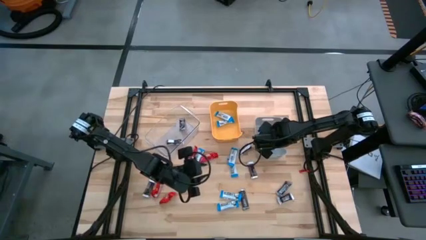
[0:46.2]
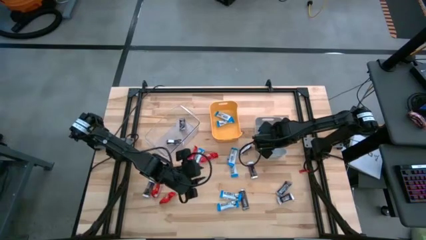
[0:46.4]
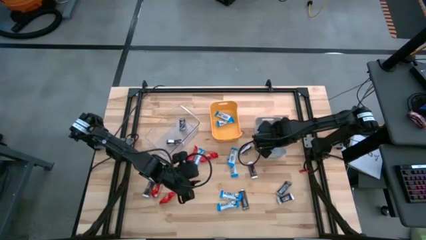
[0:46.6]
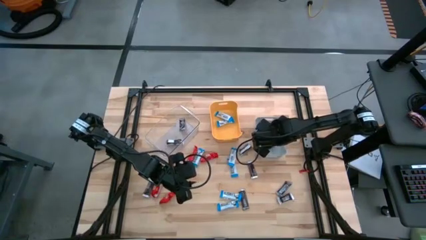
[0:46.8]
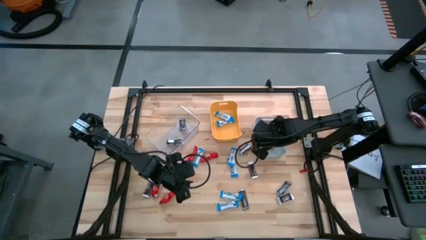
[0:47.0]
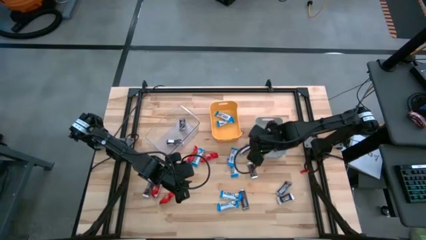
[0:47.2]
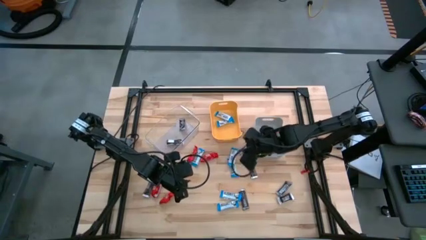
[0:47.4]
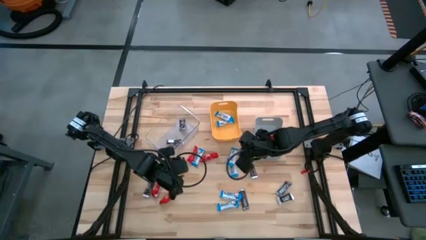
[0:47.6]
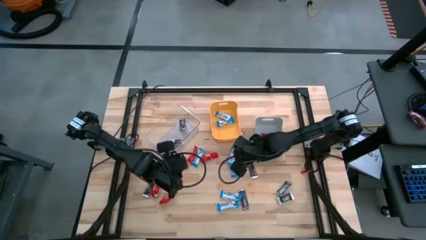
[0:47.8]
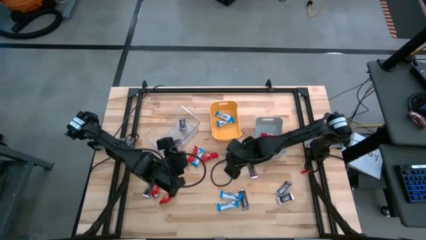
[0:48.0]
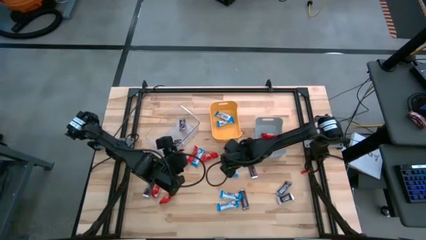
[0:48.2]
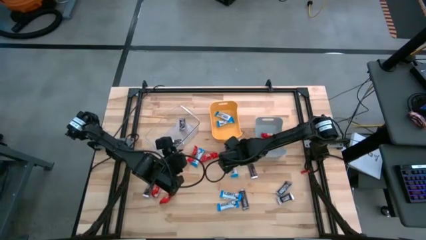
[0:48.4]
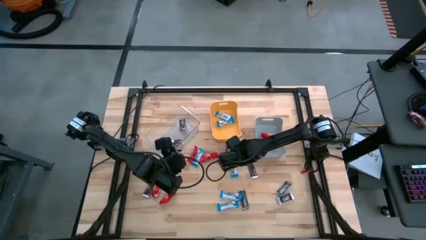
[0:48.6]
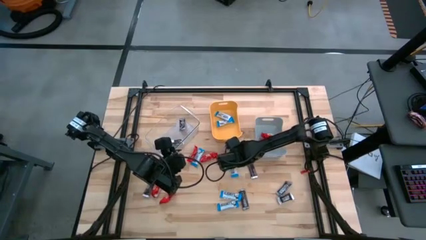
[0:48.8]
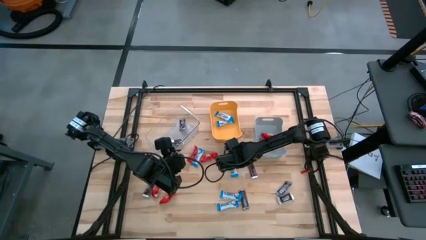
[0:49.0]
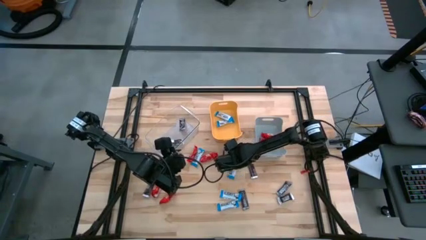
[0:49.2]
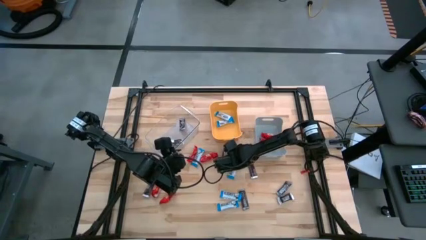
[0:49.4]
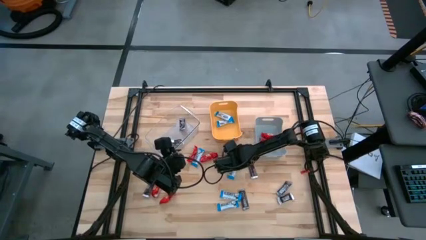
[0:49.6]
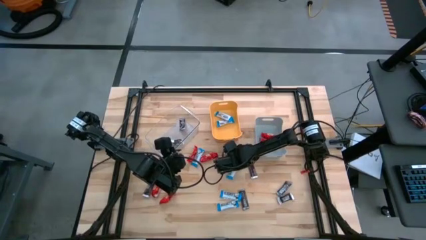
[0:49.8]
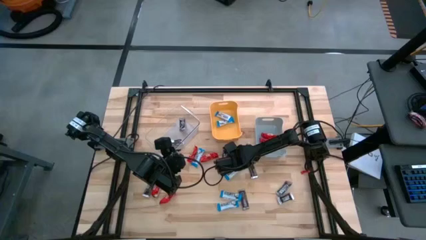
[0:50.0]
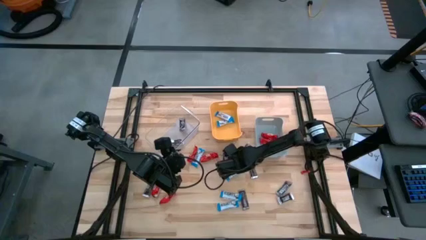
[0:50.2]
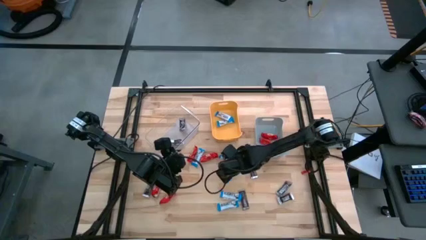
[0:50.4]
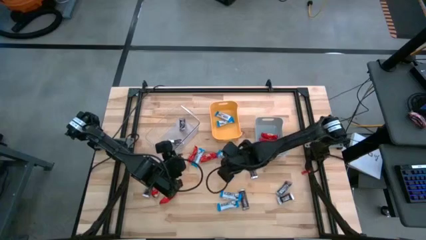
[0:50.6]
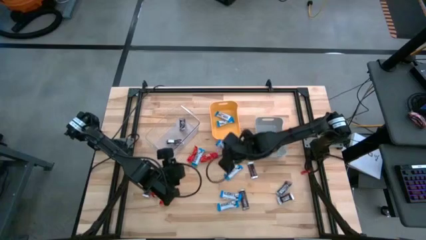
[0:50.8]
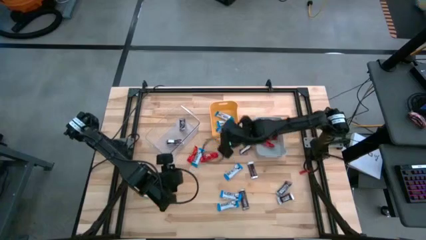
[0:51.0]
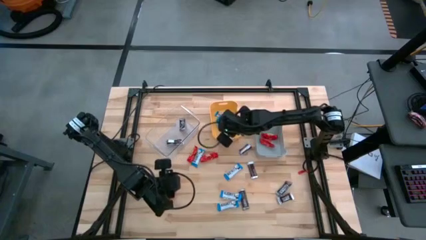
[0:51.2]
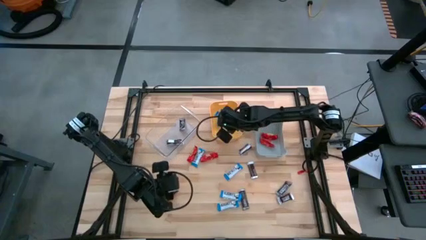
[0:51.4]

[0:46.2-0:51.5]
Task: Organize candy in baskets
Put the white chocolate into the yellow bin

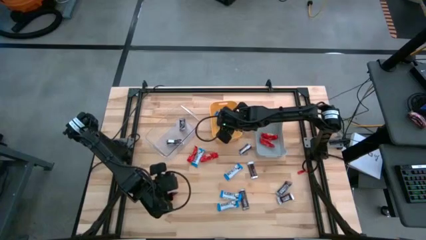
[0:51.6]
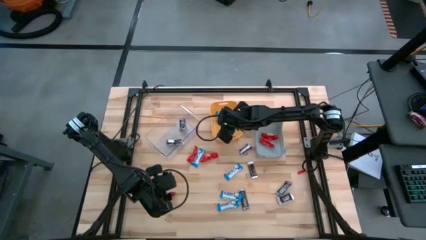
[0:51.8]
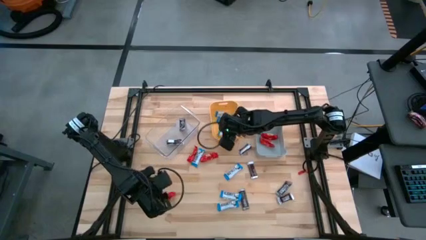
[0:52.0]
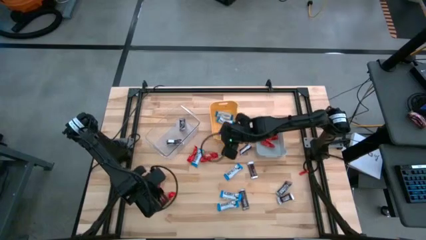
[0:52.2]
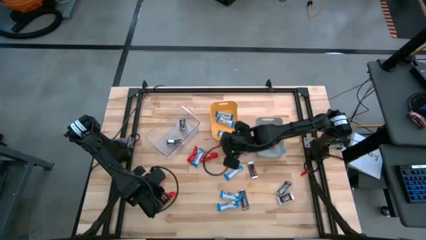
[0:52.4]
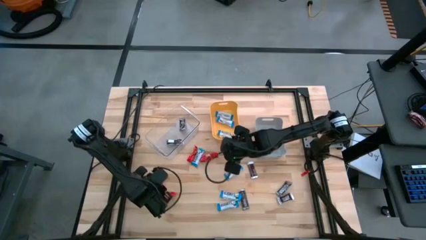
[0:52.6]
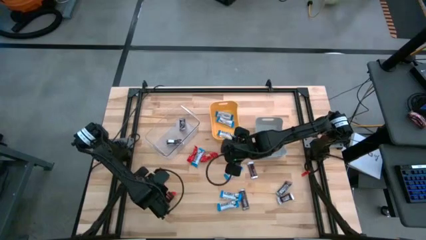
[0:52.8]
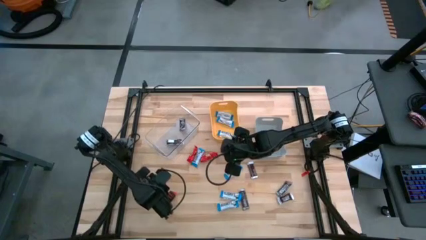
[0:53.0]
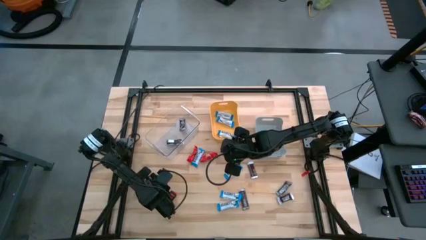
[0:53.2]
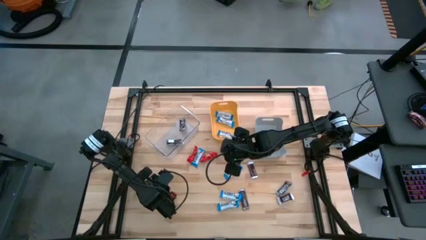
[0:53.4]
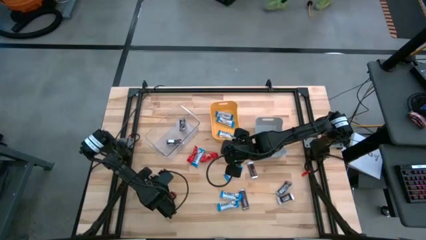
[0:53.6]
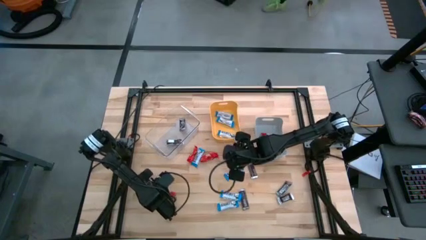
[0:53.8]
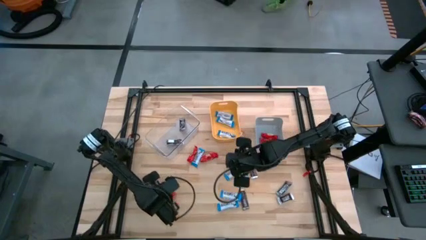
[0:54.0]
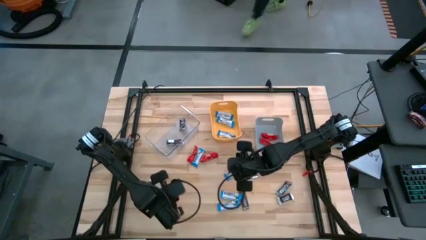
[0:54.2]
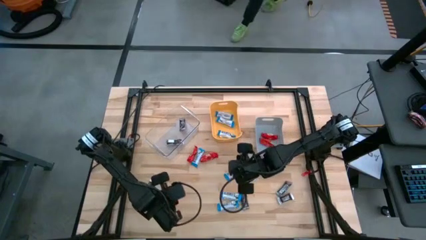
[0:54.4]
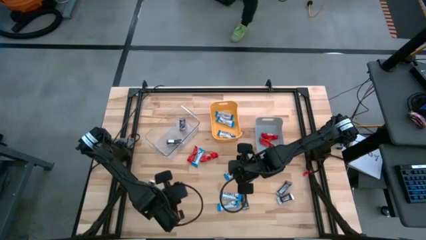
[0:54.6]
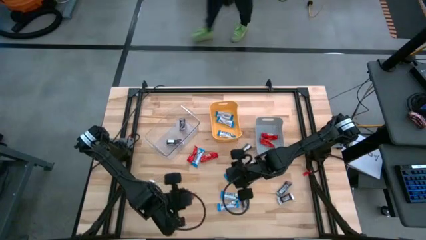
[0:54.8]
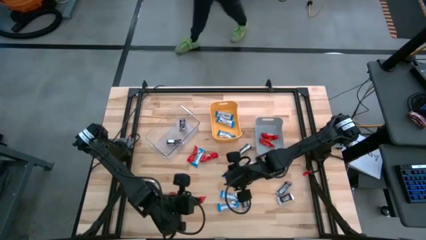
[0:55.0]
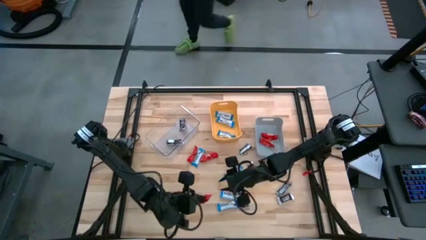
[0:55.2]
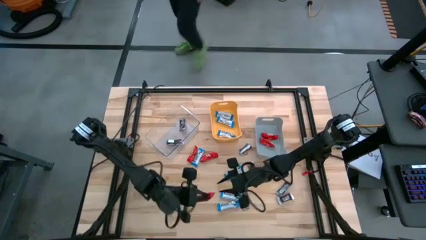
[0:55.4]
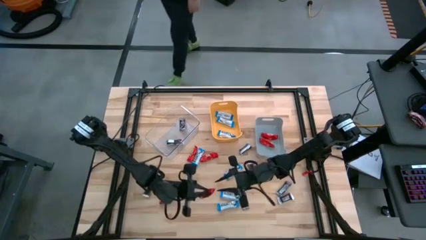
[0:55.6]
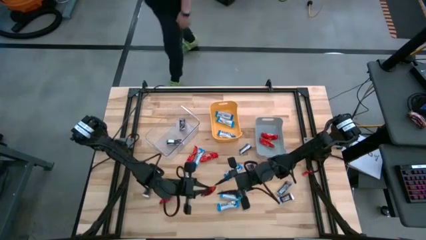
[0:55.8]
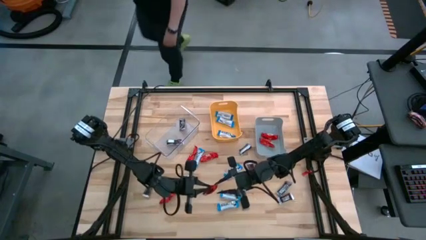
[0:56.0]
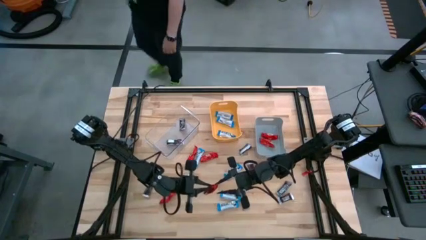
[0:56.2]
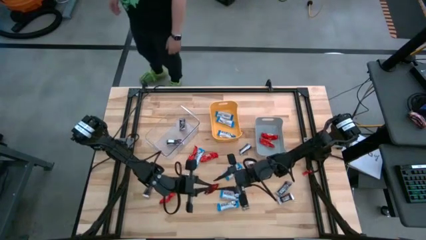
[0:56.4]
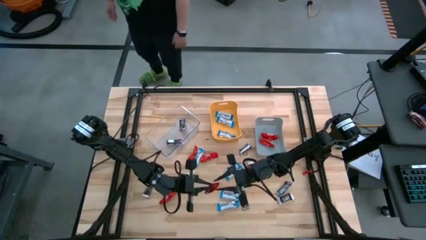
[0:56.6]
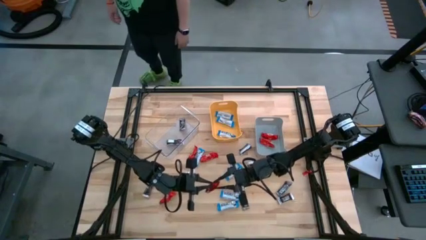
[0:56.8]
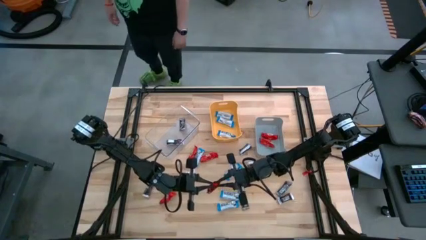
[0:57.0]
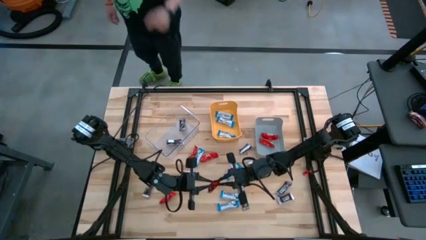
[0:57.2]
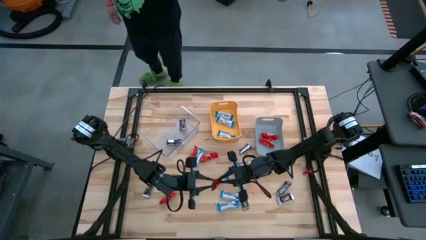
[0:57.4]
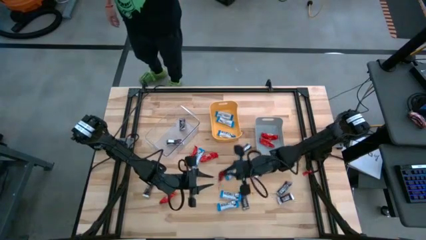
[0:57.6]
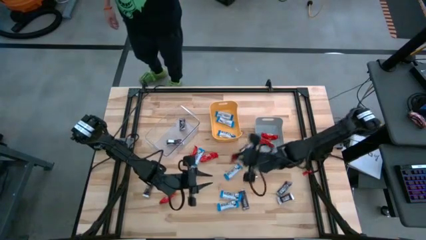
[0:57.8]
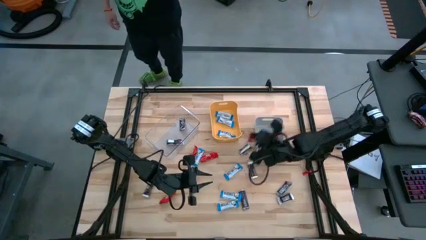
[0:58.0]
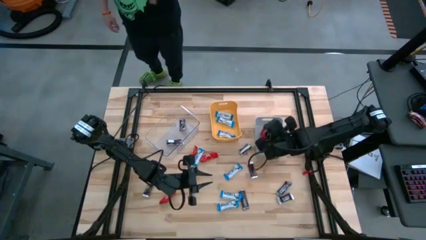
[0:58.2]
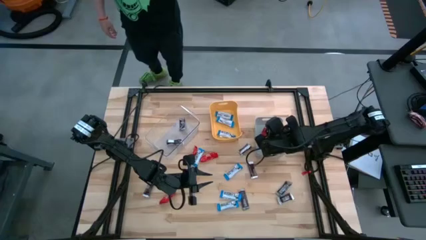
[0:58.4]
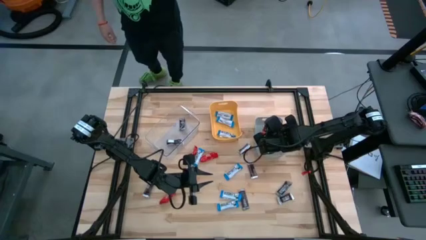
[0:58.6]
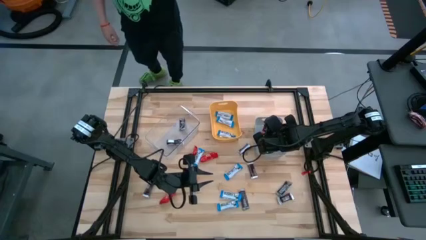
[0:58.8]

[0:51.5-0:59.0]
Put the red chocolate into the gray bin

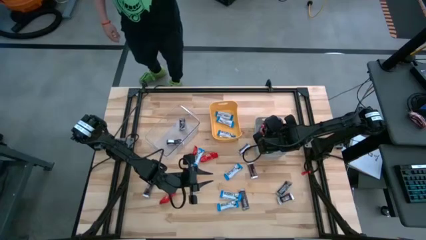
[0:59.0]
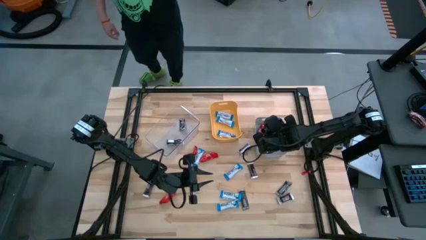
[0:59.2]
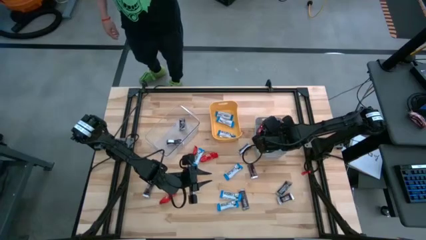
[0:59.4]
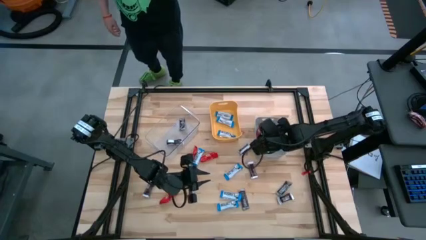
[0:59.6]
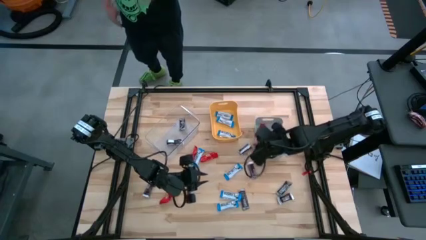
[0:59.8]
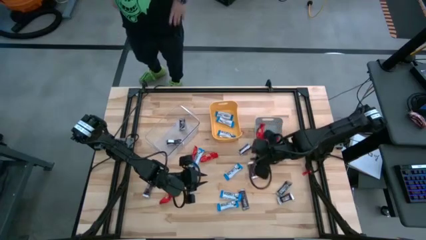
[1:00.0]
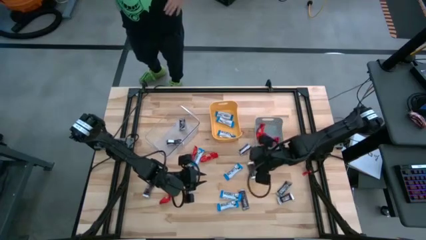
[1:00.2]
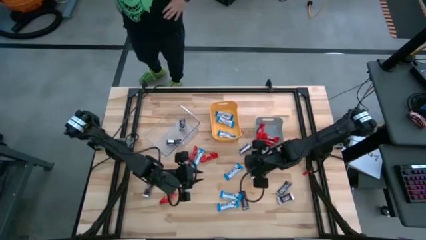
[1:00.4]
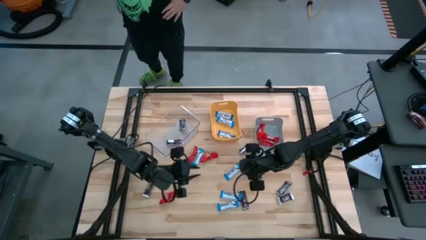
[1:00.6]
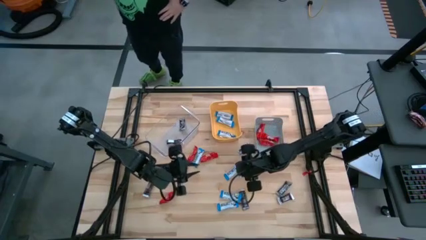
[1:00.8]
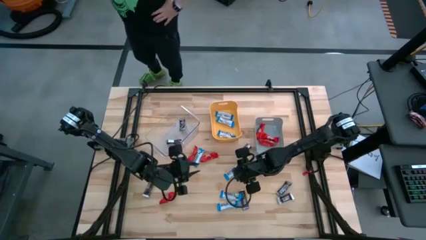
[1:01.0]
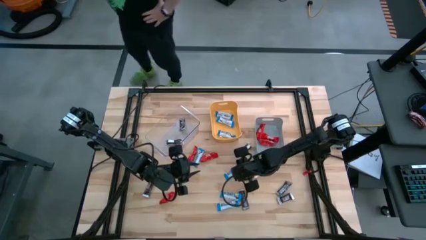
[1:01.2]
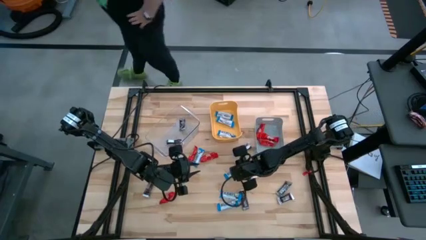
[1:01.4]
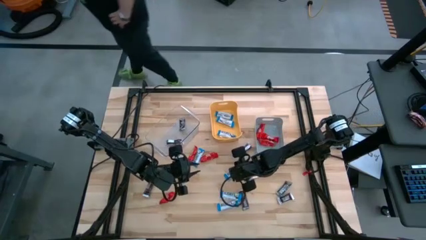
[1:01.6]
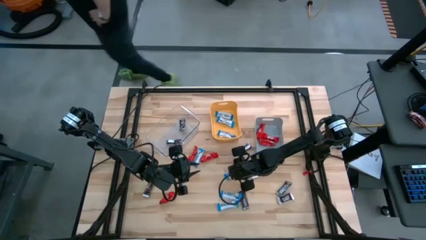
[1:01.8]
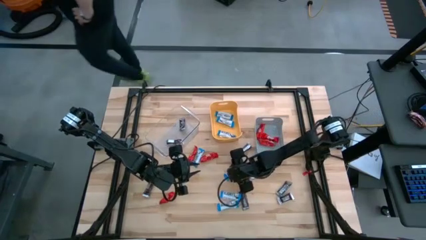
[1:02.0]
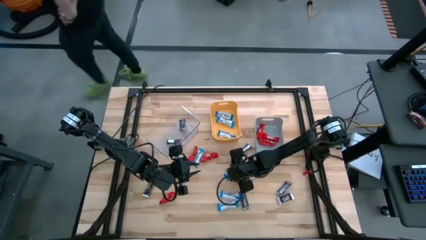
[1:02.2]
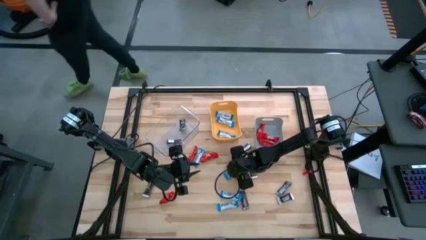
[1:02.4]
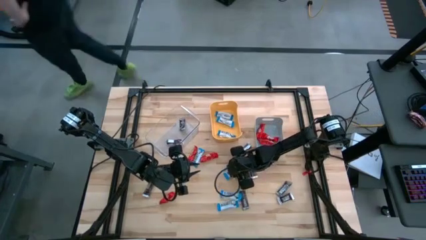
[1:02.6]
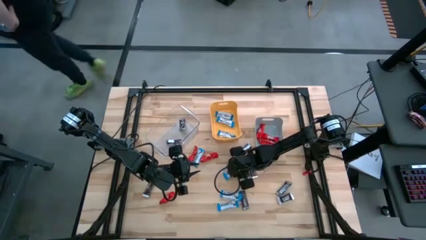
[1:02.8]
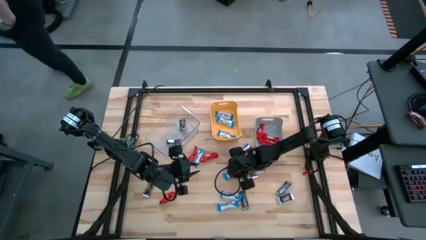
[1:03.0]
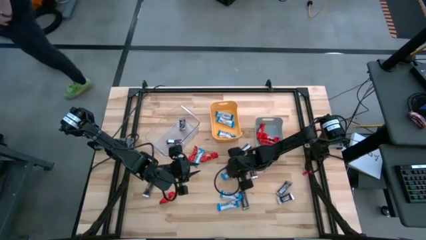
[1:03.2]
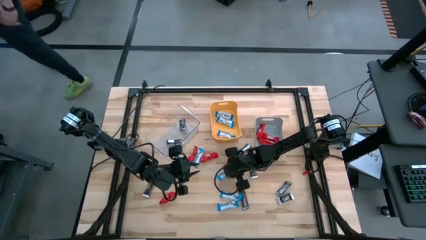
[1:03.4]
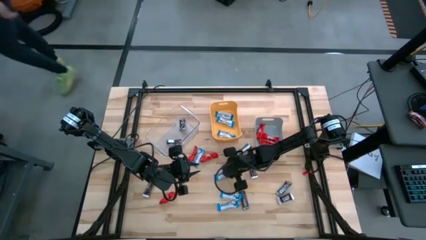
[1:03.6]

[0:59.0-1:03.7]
Put the white chocolate into the yellow bin
